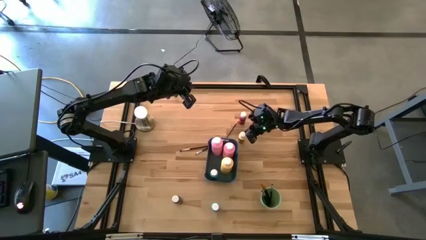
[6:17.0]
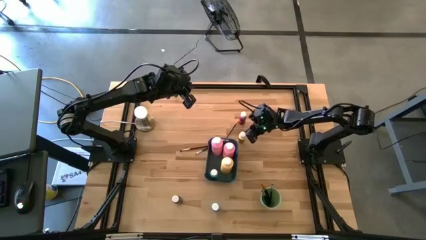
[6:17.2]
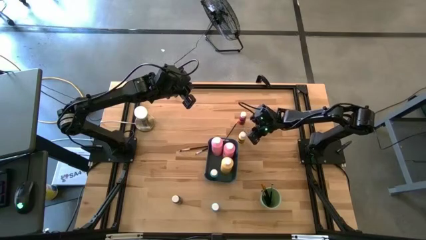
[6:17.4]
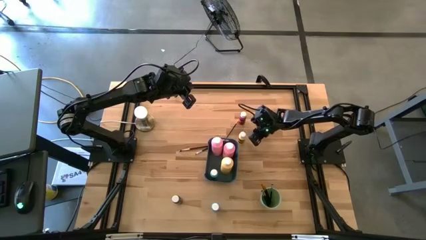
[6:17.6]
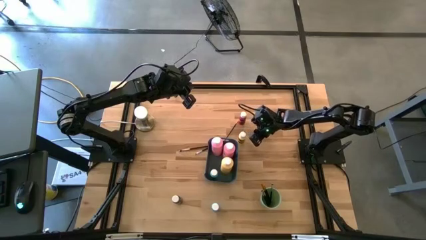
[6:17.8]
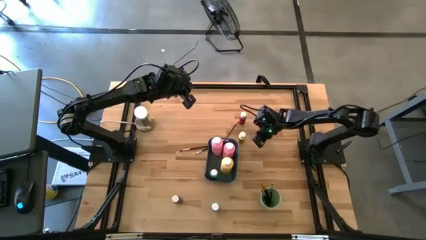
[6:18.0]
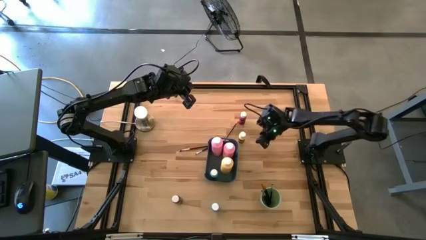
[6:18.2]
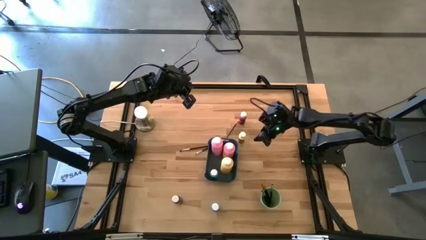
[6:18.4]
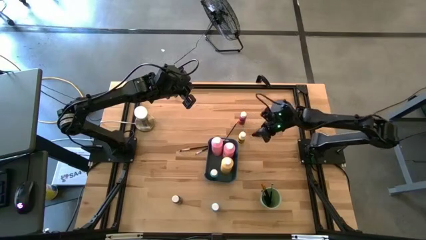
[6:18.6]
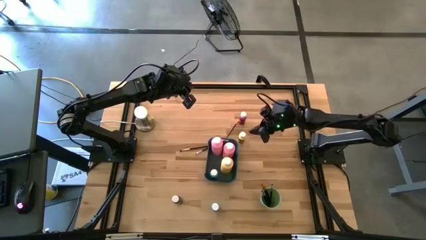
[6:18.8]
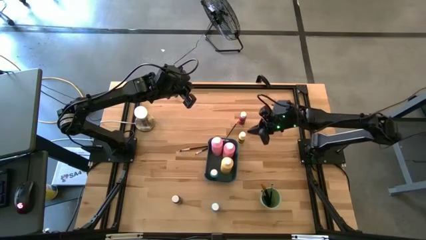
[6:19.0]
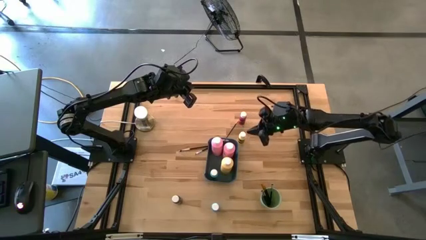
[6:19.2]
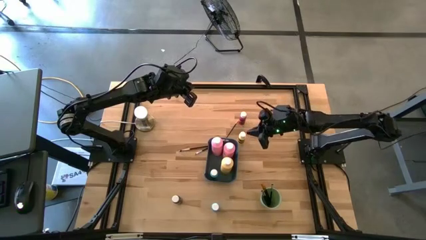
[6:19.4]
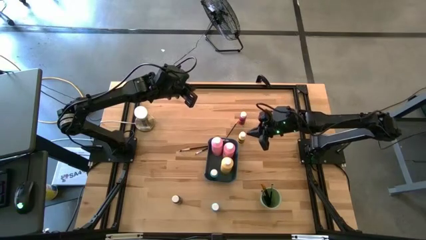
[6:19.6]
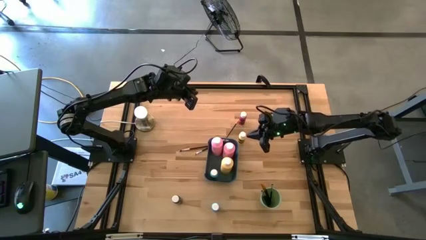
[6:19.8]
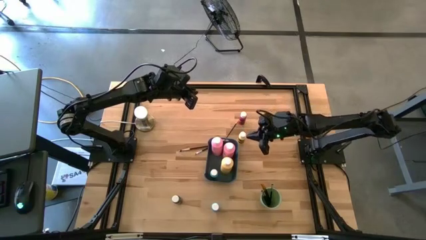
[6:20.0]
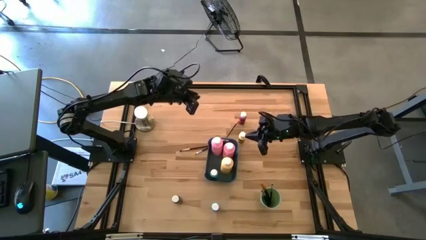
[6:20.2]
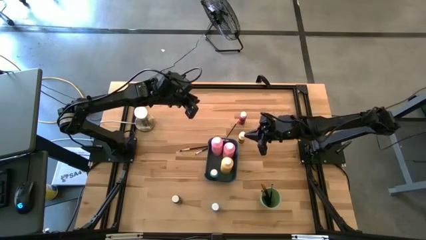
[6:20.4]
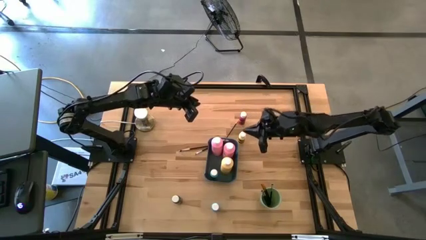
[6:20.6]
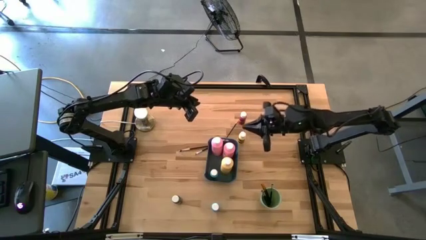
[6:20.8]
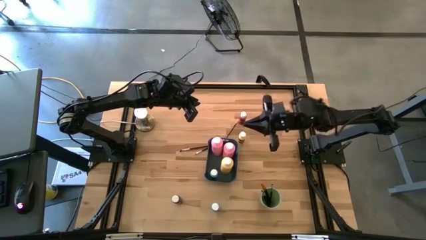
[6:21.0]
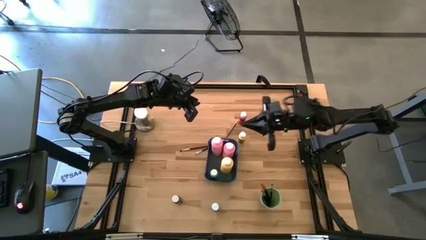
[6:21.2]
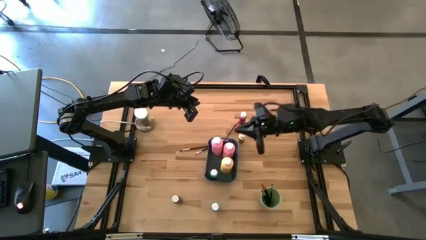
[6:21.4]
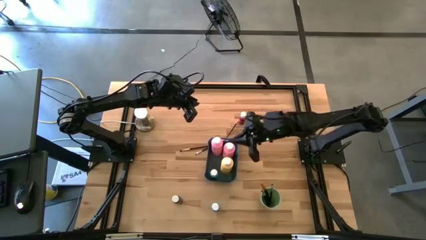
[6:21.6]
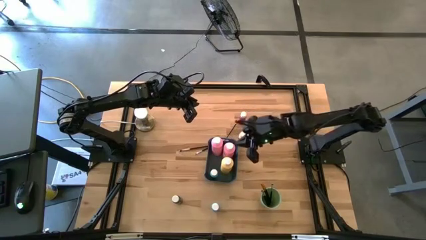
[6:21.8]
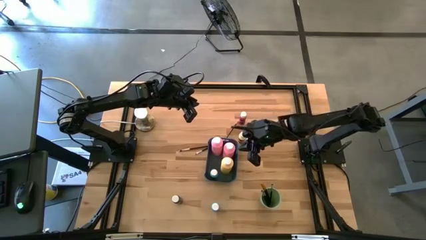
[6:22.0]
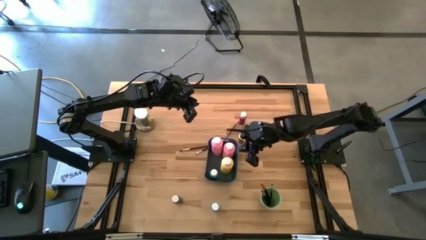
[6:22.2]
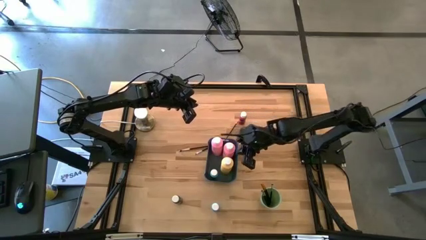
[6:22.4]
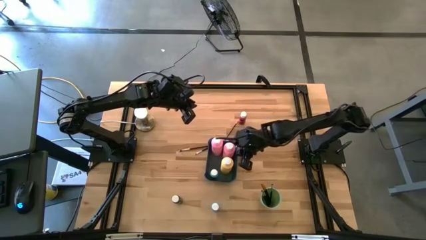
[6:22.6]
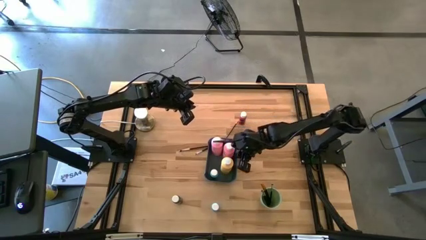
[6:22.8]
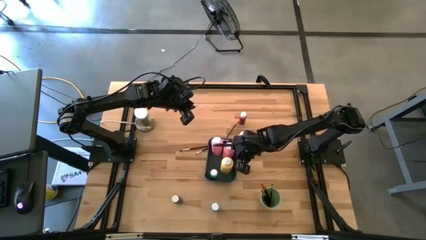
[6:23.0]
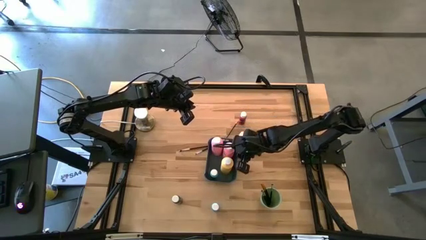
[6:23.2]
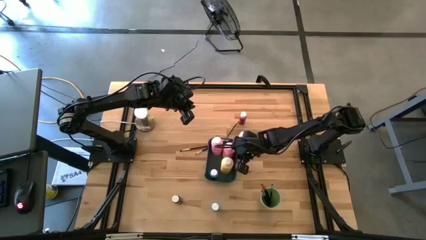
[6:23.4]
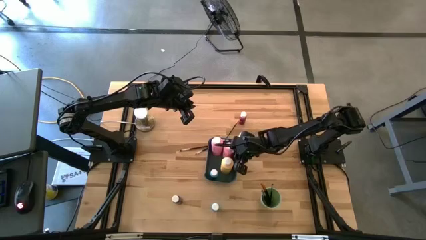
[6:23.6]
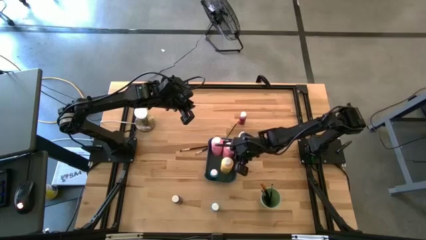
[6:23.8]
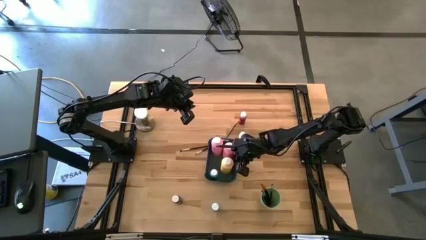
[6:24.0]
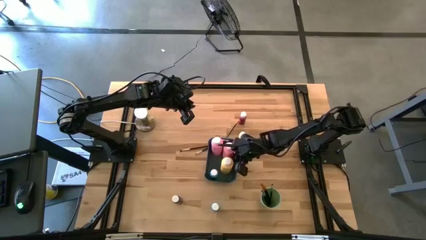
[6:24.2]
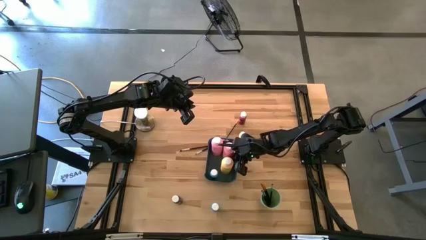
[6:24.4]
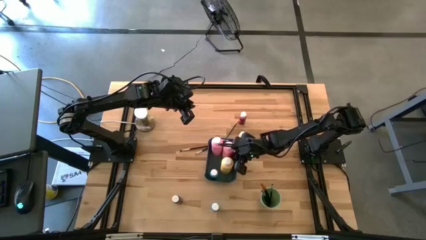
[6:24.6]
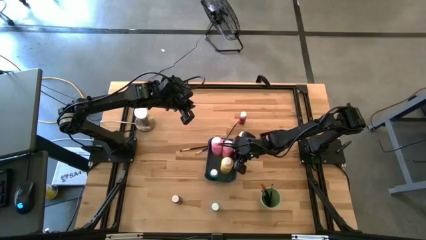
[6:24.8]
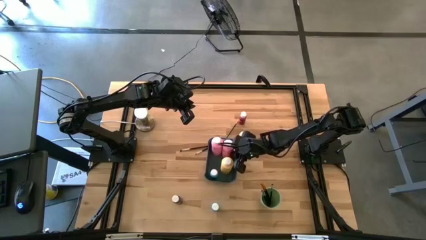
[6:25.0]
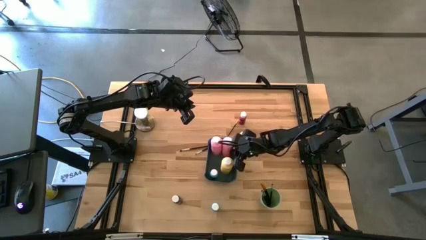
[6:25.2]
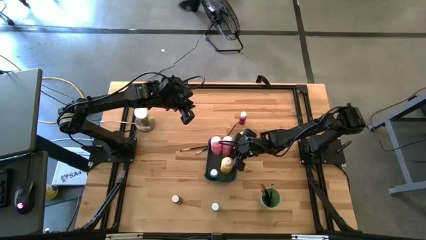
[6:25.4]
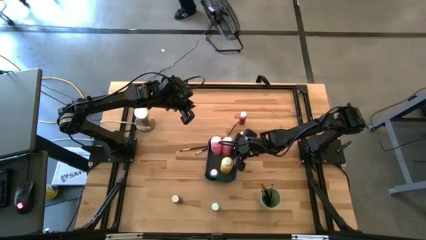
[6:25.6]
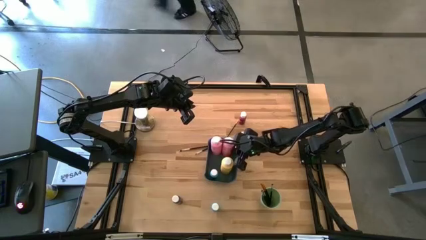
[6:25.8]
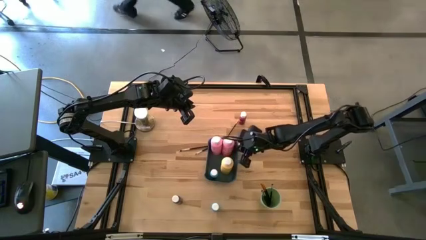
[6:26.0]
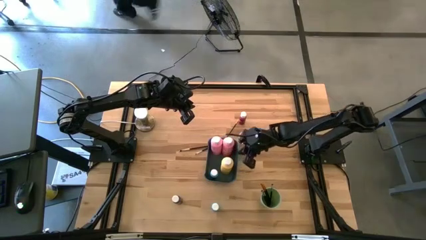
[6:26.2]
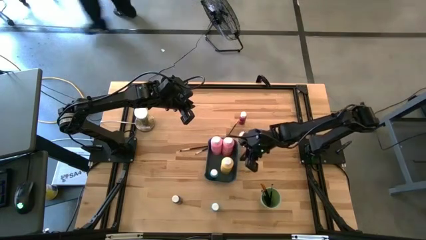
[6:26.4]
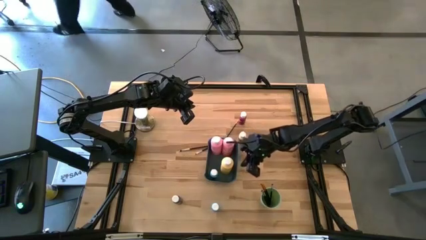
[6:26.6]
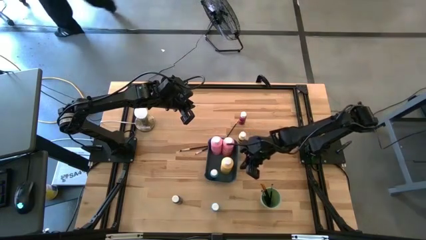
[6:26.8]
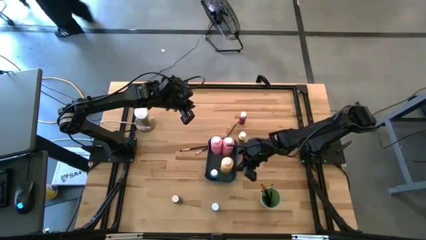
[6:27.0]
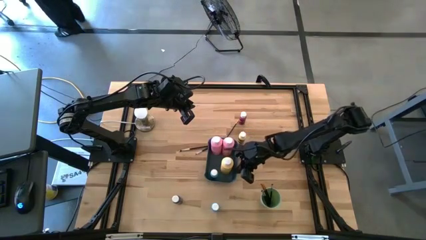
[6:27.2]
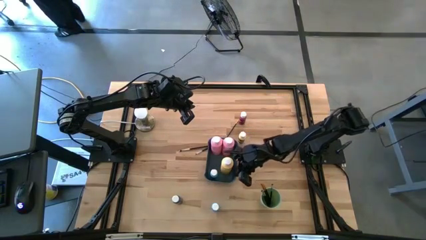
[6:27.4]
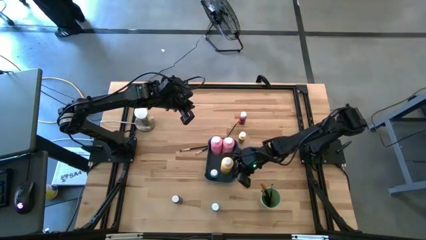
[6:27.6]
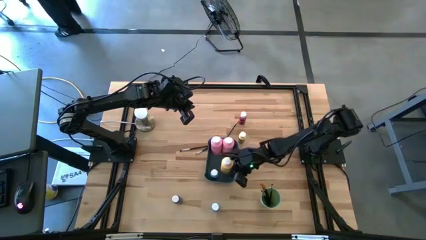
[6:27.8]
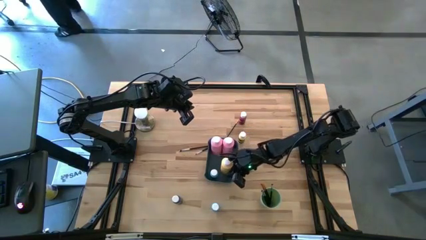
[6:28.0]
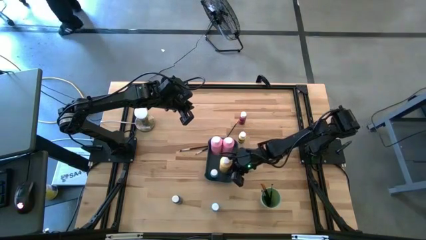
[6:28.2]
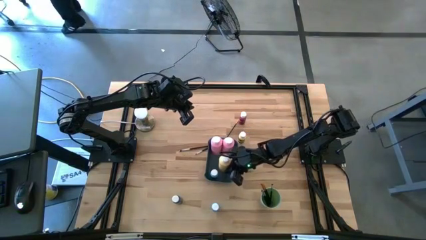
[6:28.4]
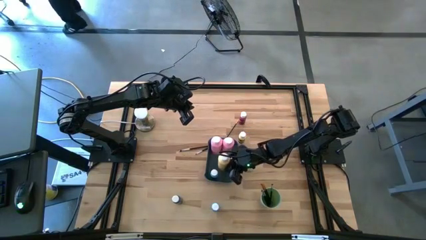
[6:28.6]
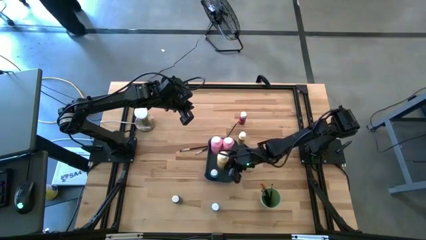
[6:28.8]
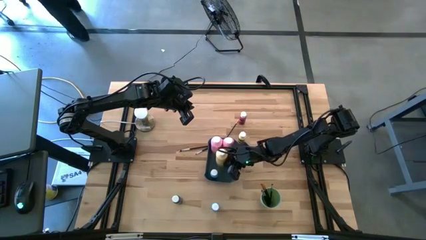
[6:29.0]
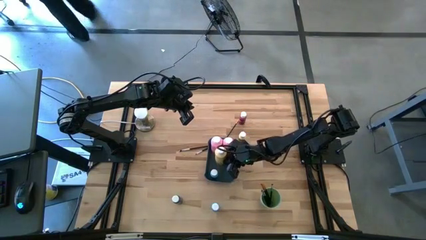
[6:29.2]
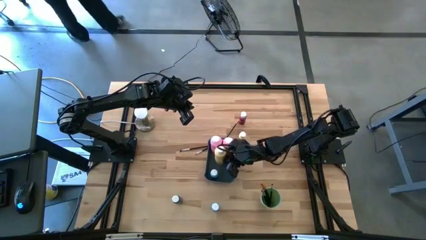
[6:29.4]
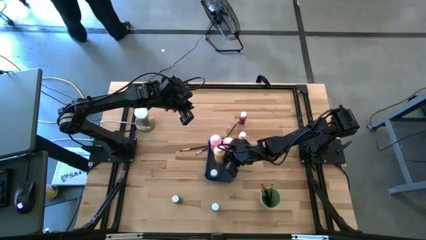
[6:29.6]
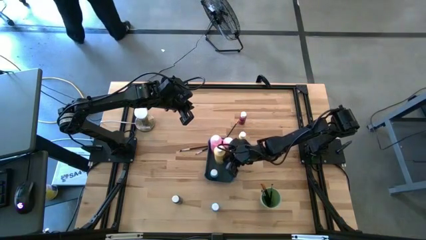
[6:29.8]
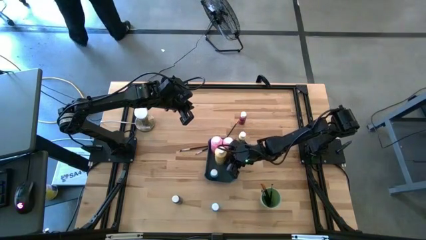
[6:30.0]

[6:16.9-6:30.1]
Task: Pick & Place Paint Supplies
Adjust the large paint bottles in the blue bin

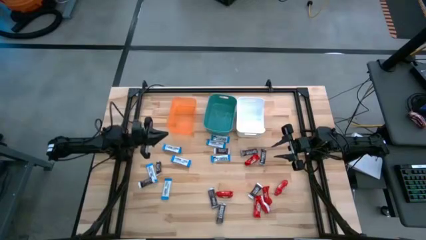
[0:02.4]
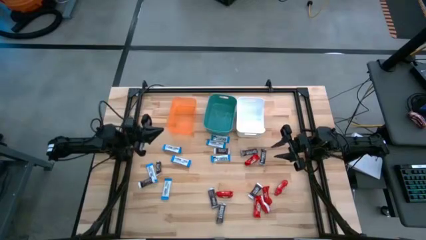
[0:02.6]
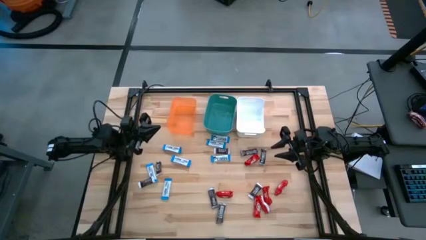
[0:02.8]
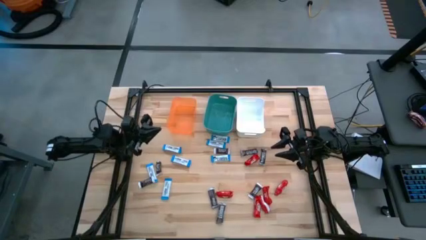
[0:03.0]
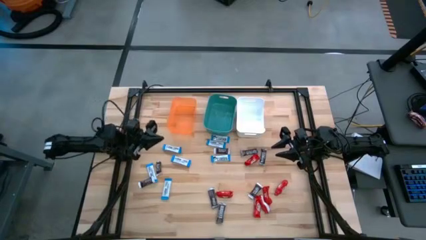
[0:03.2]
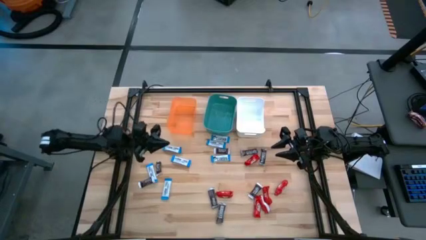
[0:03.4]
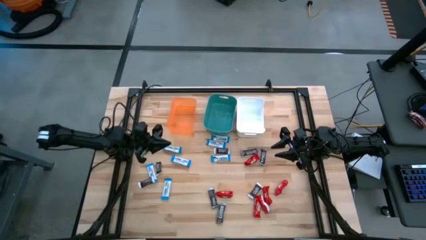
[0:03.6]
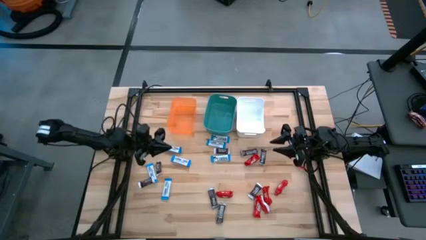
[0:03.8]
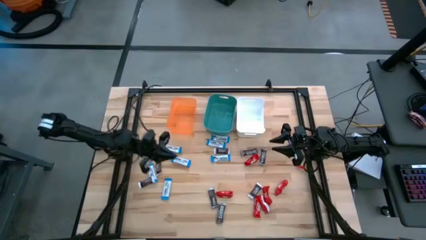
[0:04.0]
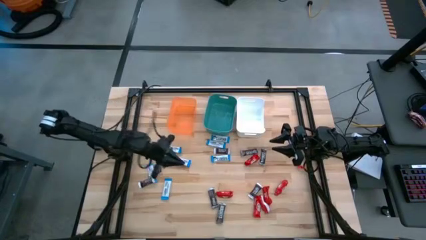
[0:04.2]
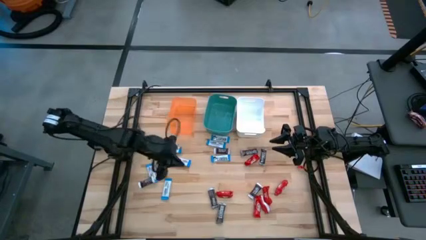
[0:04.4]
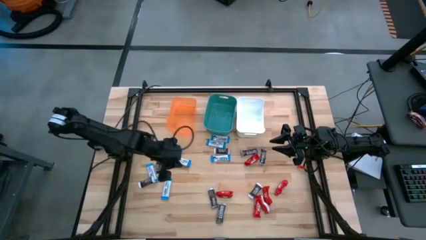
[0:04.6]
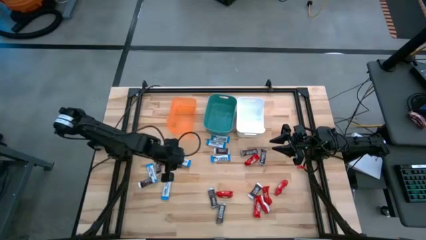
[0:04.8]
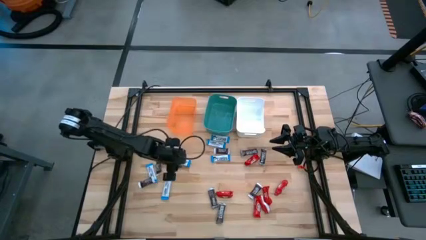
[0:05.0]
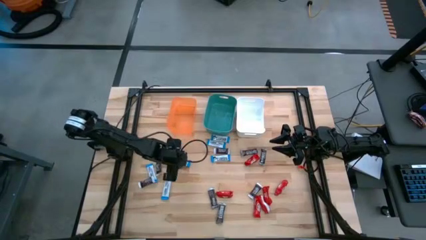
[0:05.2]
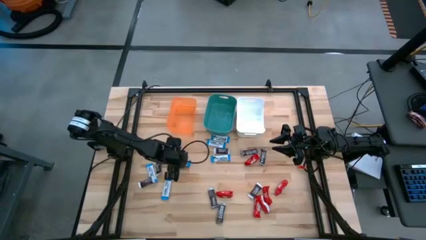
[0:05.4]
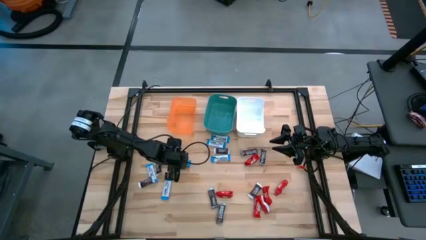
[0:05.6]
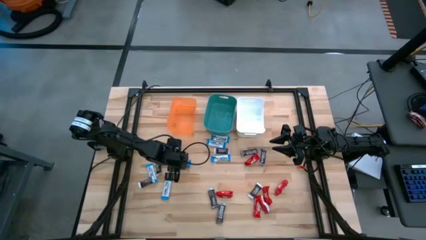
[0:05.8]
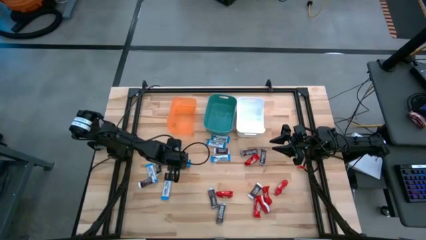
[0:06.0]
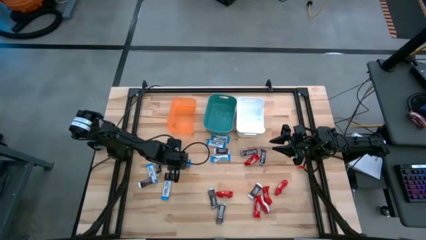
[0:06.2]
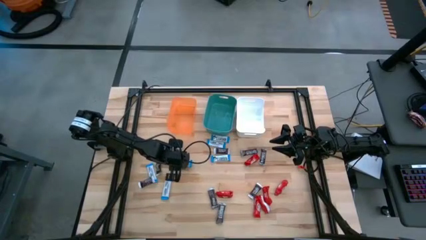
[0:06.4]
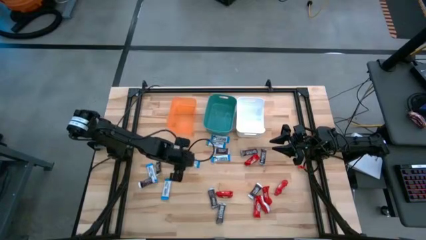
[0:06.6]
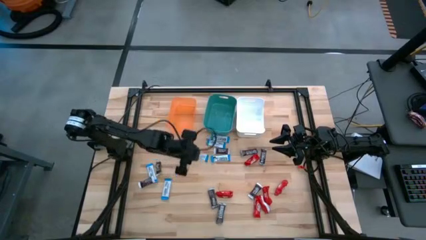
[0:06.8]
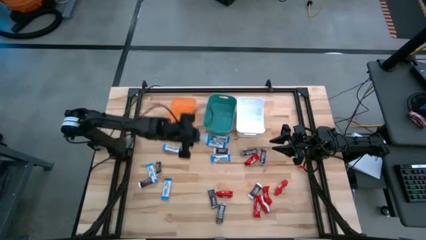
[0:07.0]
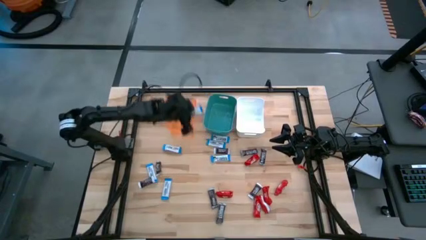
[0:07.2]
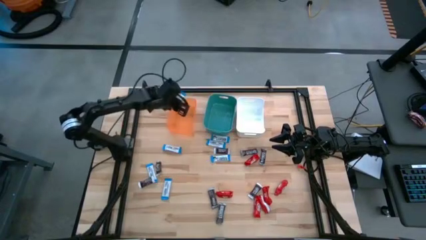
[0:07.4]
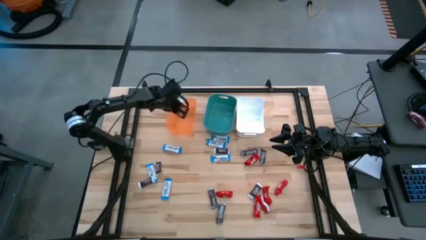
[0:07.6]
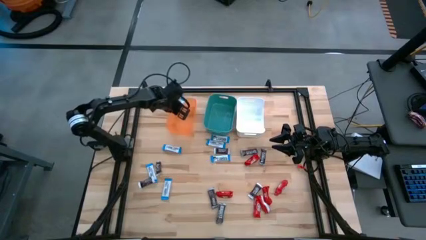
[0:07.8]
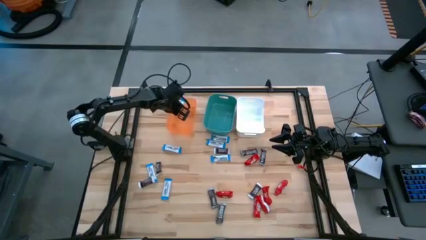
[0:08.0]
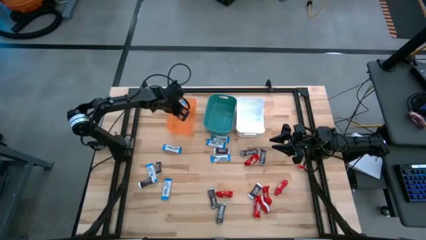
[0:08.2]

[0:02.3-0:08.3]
Task: Organize candy in baskets
Put the white chocolate into the orange bin
